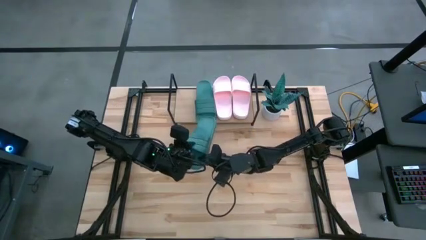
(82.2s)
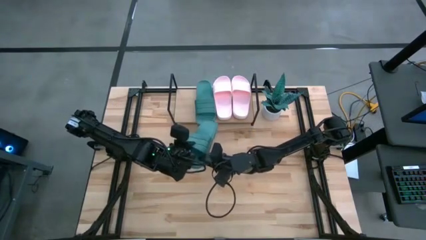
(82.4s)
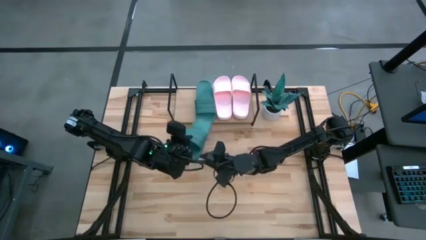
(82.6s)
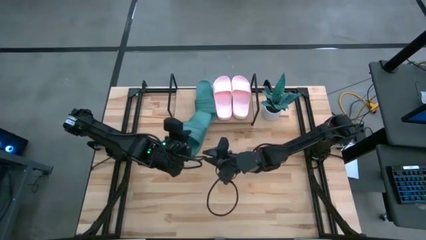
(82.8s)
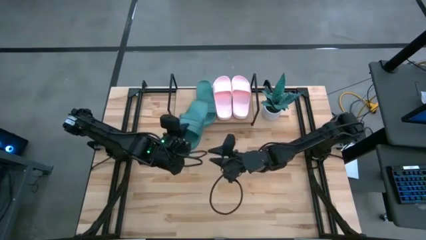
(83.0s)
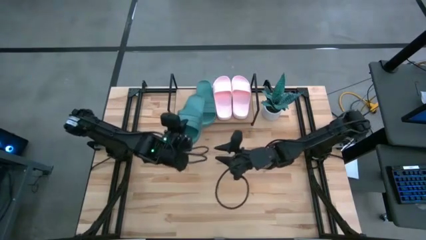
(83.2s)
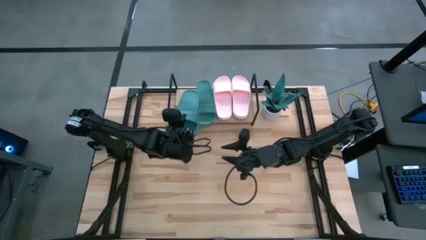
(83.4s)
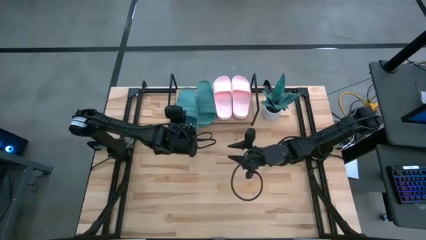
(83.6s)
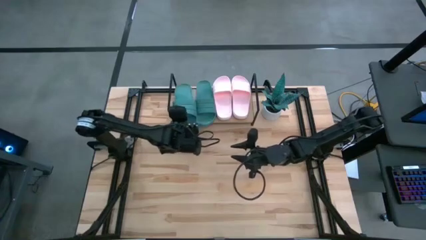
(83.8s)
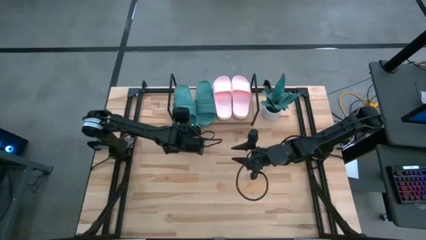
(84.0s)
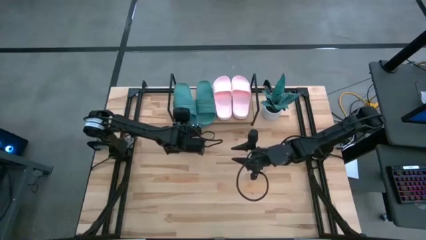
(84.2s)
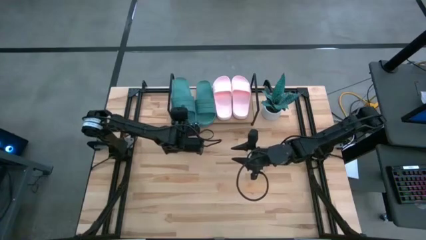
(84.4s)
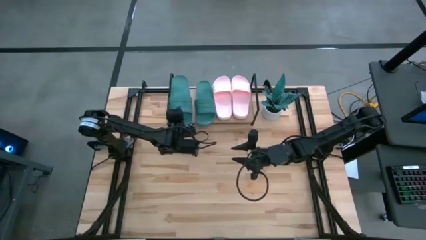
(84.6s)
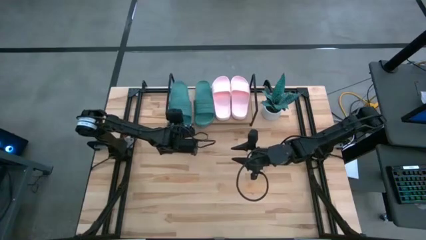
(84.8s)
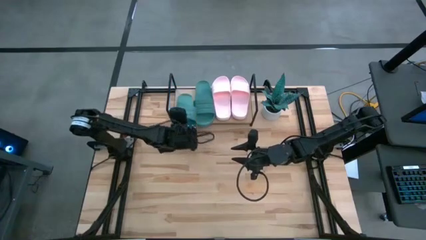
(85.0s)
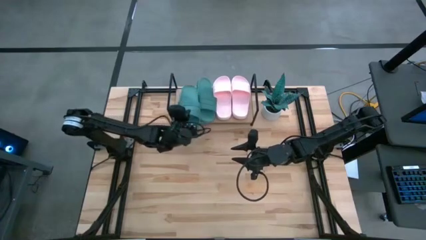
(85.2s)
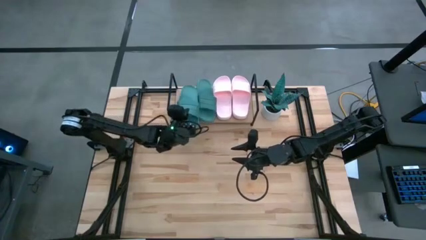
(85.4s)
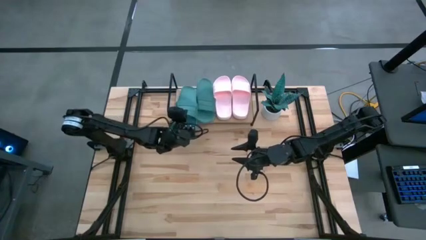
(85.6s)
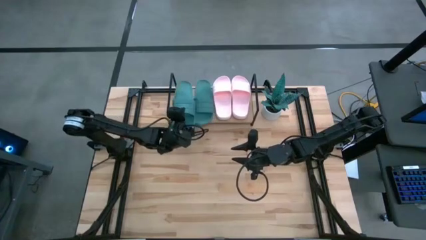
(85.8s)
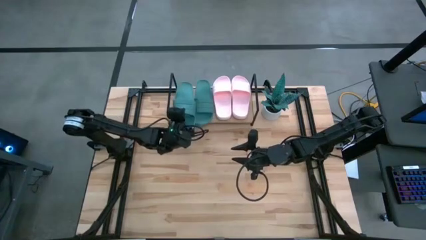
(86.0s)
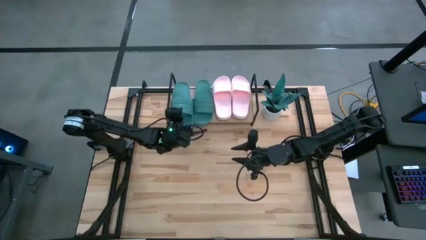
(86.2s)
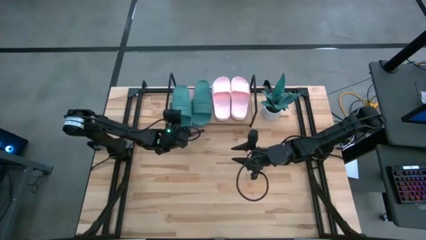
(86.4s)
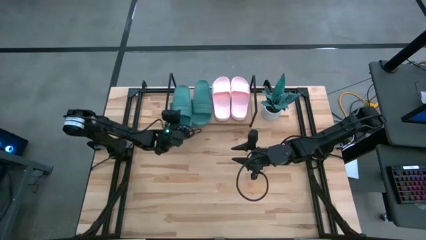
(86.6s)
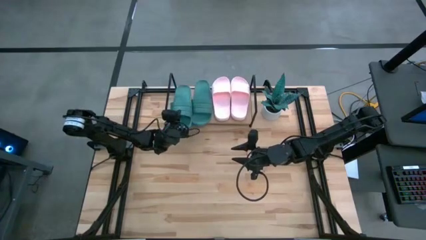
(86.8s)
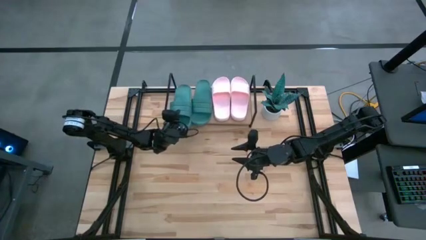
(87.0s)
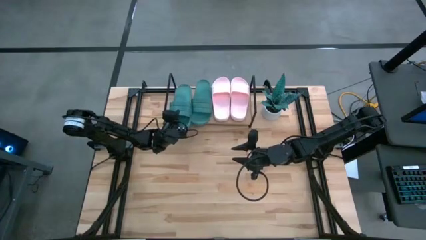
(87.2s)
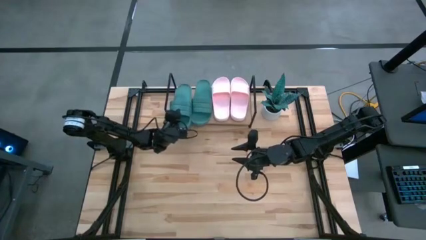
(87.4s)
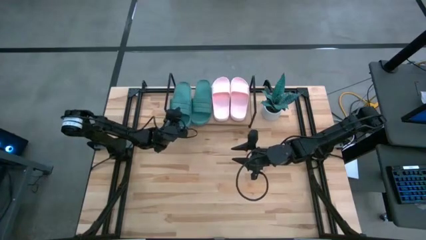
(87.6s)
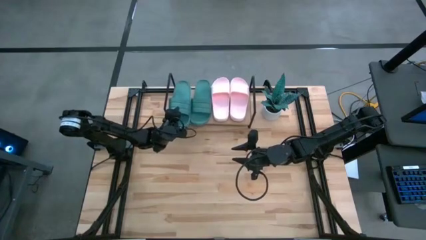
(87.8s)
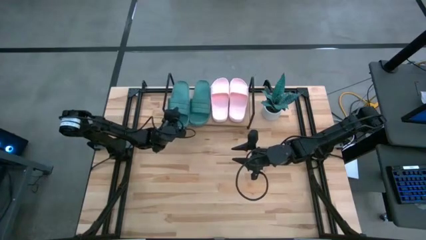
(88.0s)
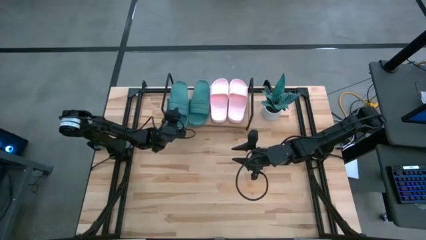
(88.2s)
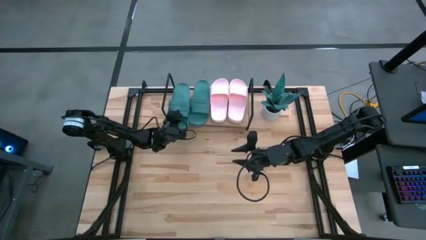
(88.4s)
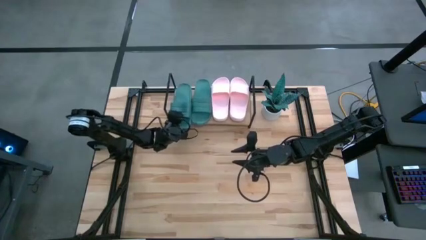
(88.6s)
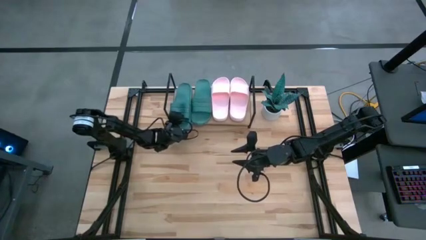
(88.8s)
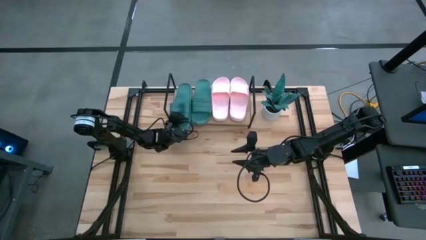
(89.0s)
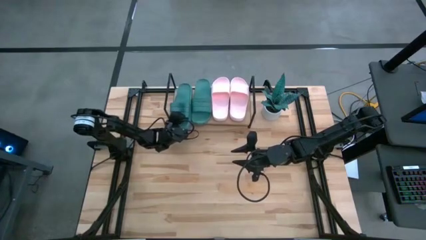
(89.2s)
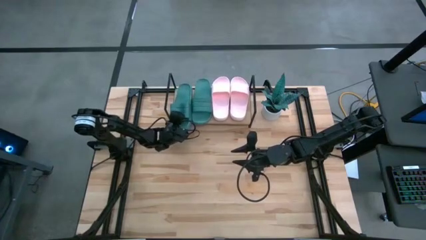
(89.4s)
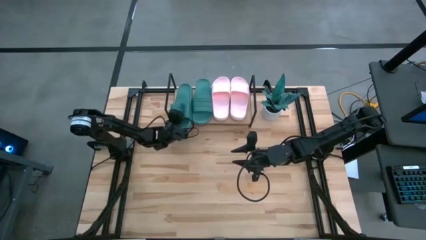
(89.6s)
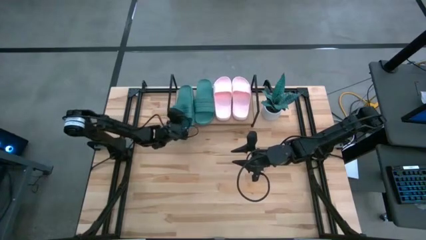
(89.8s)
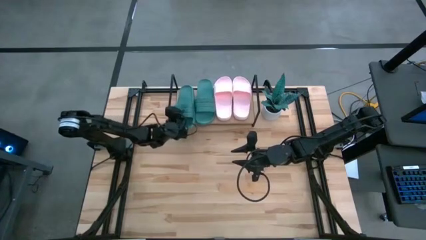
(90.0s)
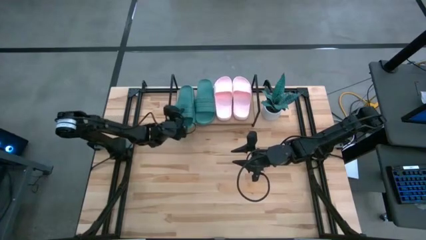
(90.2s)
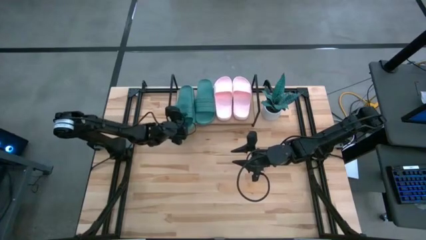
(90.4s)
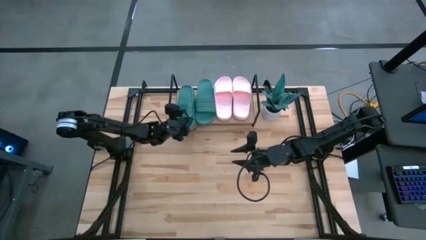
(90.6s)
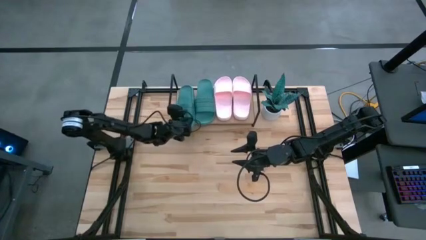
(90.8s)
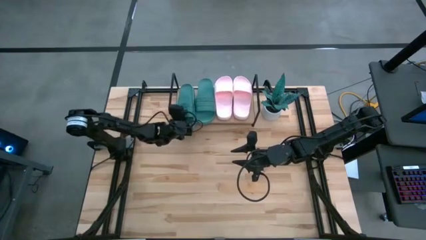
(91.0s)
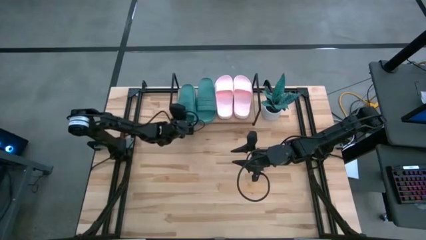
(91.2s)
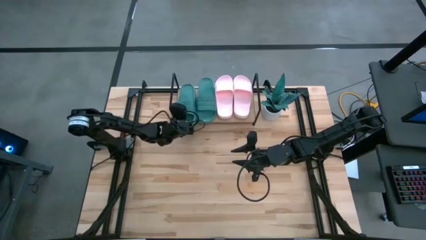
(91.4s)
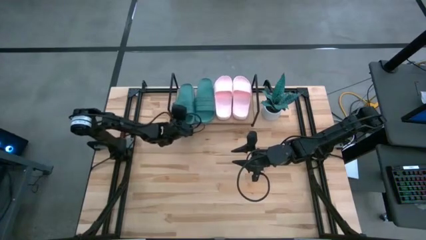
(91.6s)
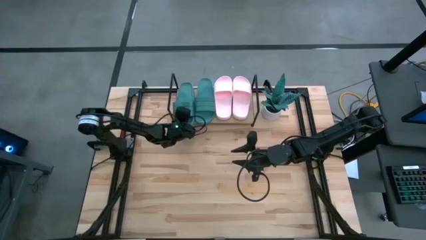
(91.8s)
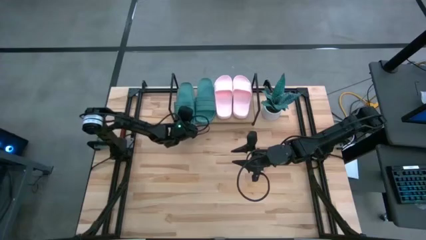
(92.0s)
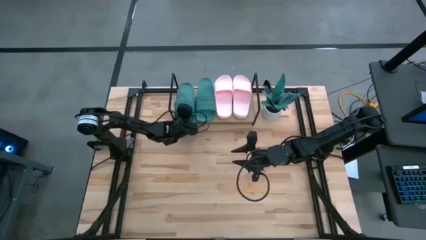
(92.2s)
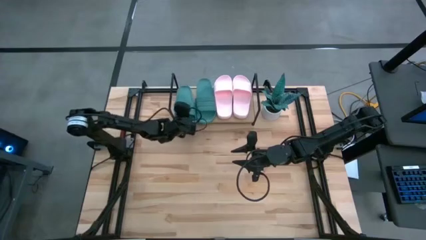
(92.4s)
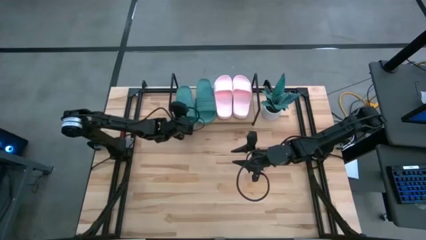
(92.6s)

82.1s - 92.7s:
Task: Pick and place slides into the shelf
Put the green slipper on the shelf

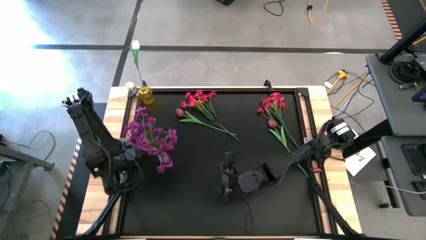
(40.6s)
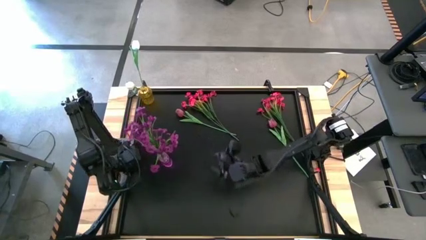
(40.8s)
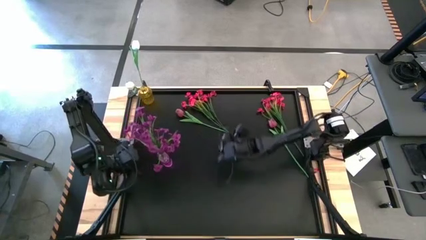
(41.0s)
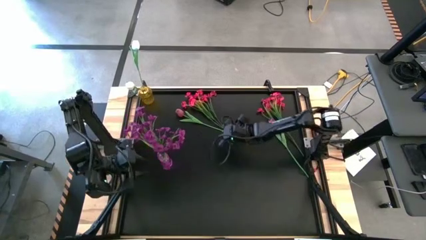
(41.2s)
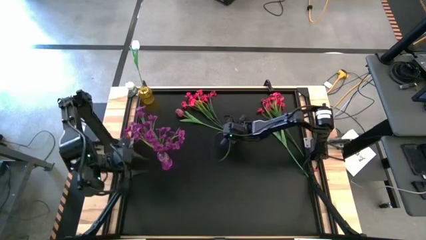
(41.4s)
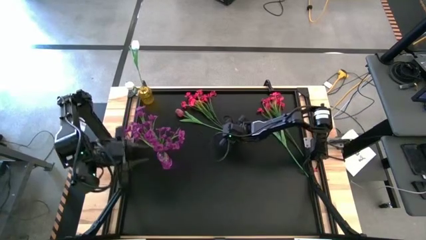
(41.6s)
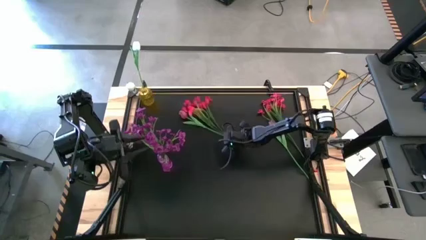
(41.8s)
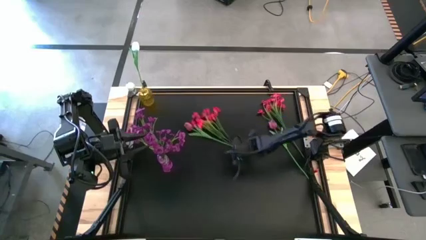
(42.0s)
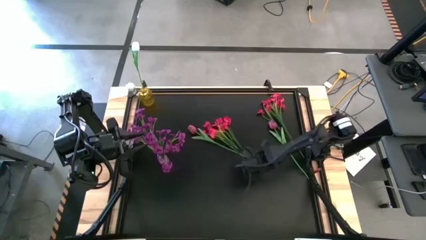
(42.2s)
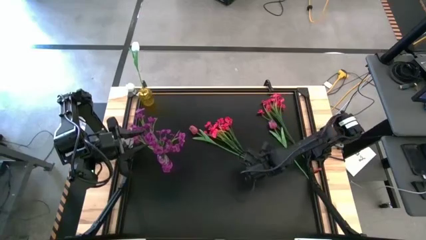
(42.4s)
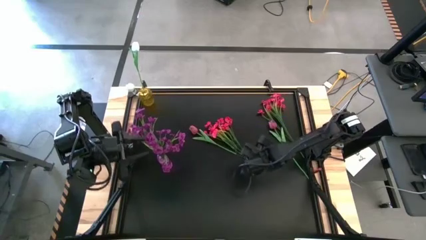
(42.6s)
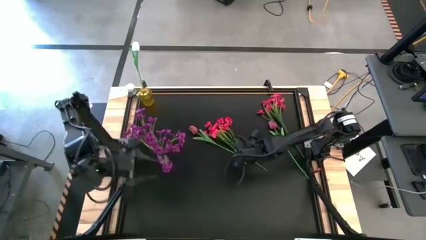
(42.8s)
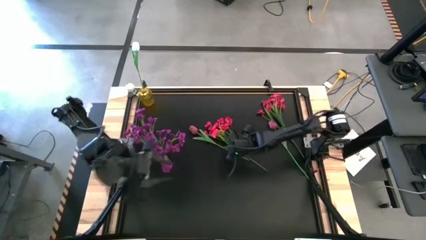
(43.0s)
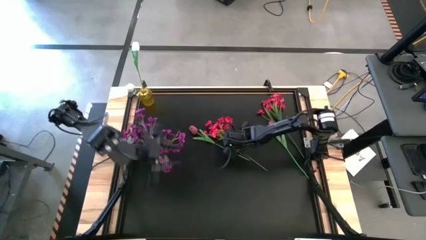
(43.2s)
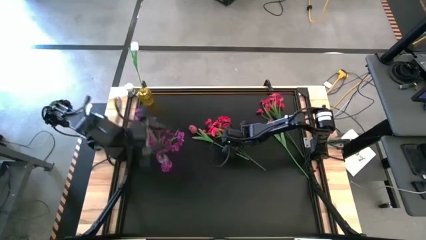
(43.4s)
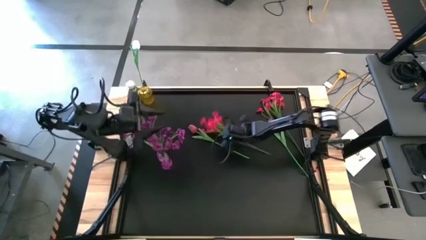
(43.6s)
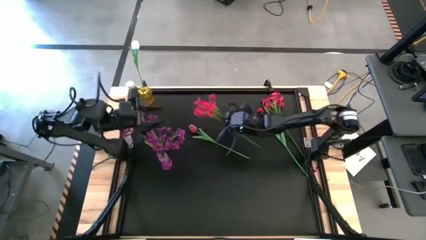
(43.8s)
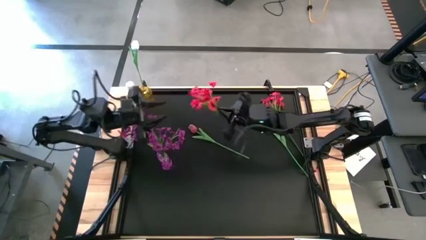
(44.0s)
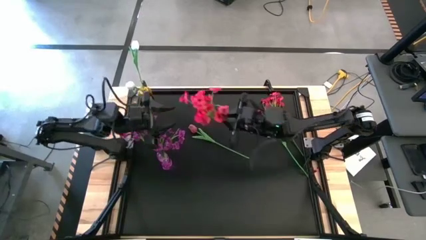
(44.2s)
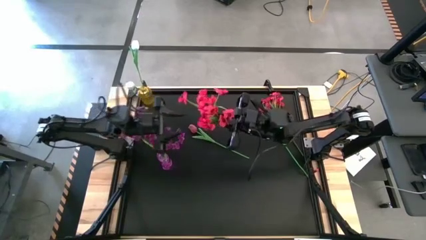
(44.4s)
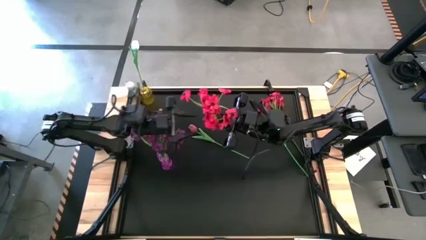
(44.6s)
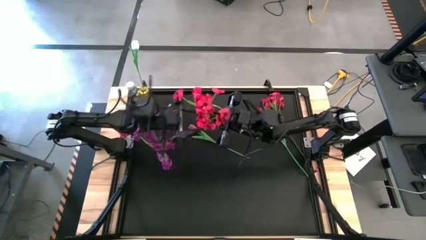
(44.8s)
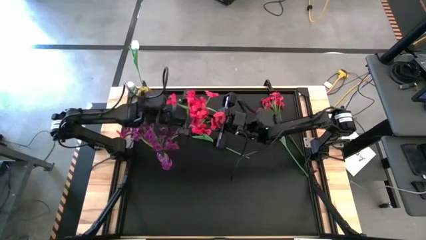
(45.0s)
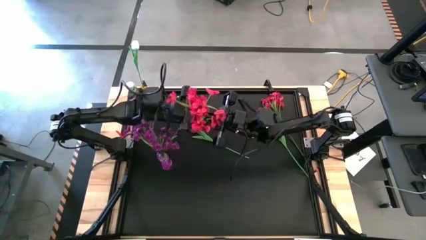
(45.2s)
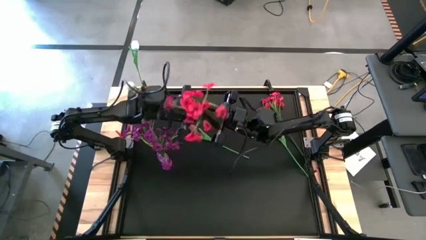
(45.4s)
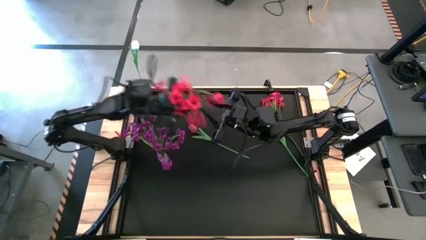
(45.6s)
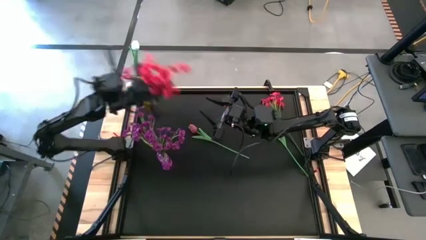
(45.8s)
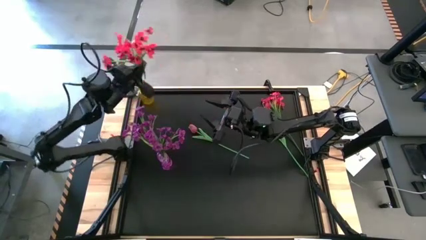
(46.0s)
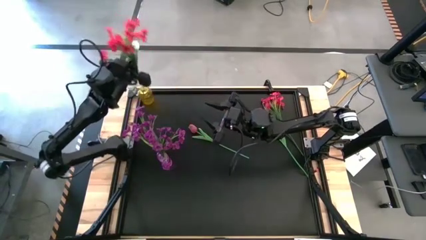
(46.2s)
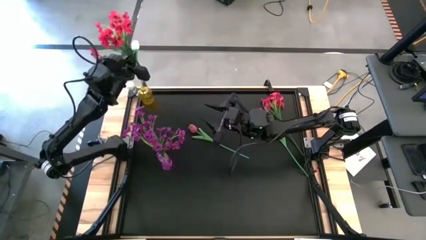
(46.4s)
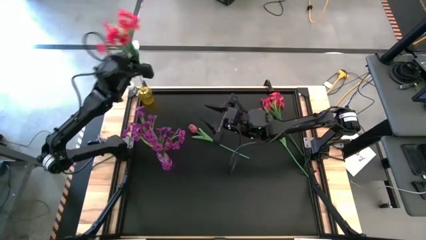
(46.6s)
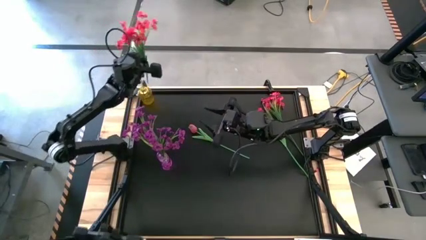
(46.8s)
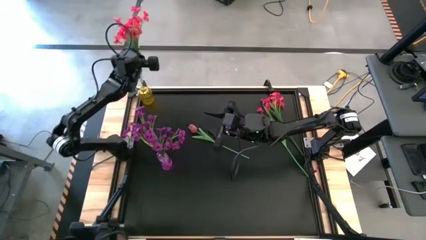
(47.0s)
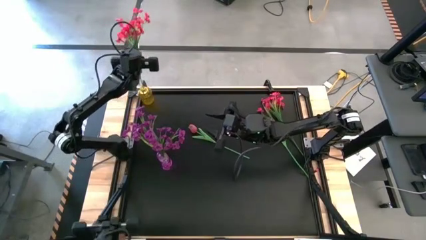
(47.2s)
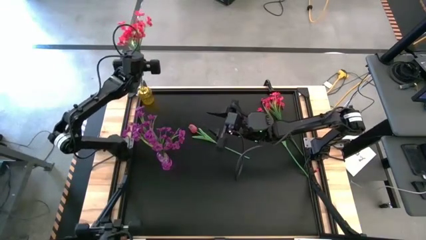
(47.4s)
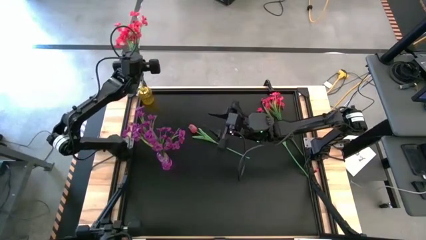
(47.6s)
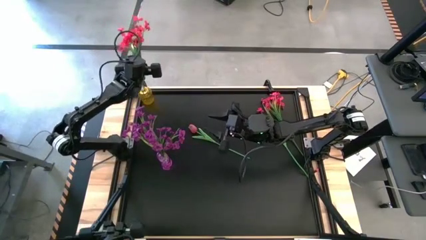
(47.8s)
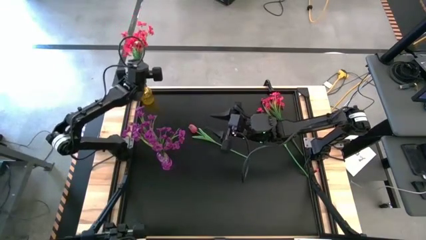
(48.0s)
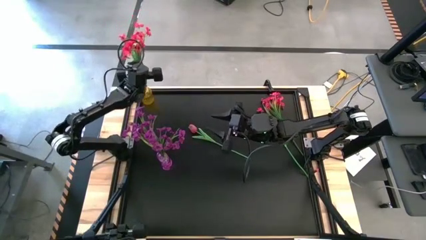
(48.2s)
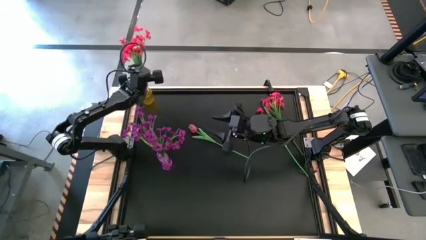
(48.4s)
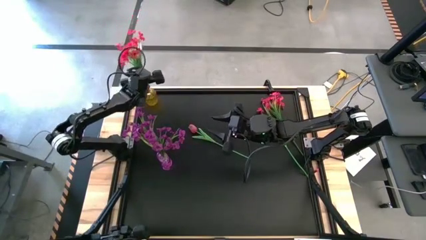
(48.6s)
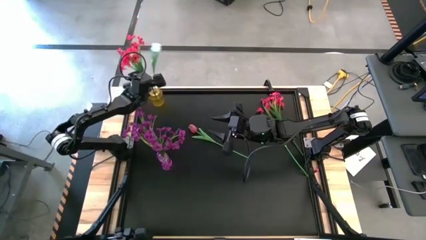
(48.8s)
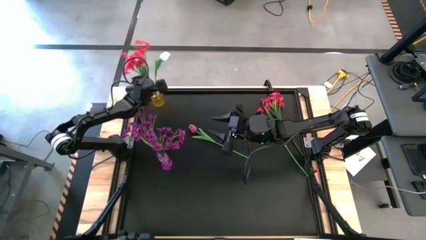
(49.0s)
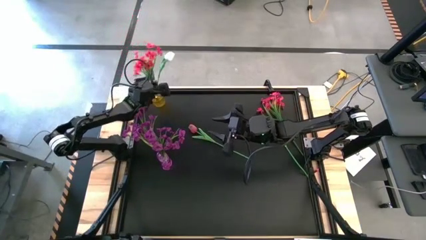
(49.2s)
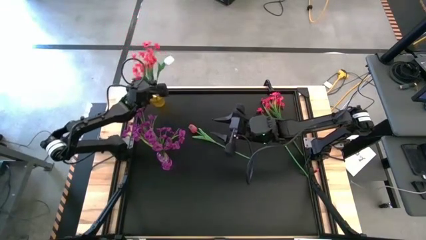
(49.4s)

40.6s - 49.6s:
Task: Sort flowers into vase by color
Put the left pink flowers into the yellow vase
